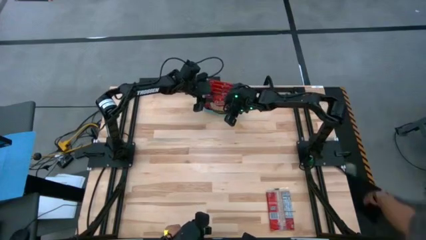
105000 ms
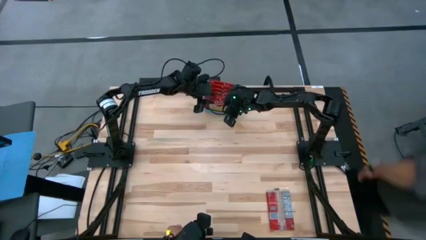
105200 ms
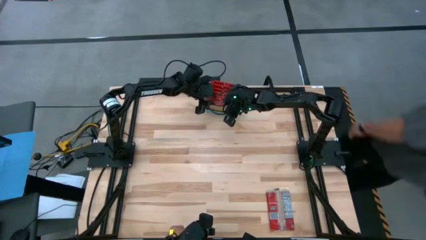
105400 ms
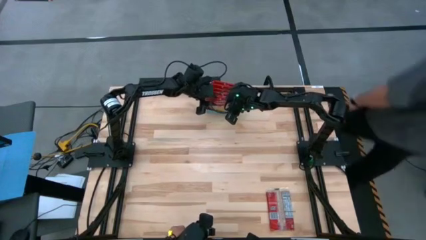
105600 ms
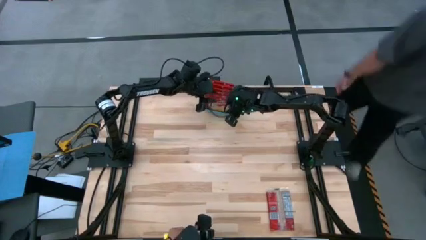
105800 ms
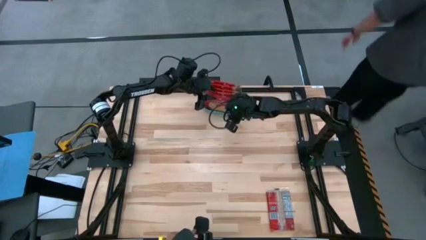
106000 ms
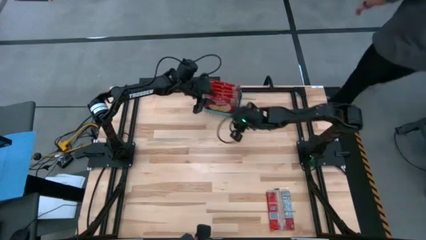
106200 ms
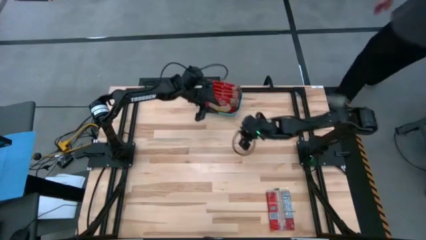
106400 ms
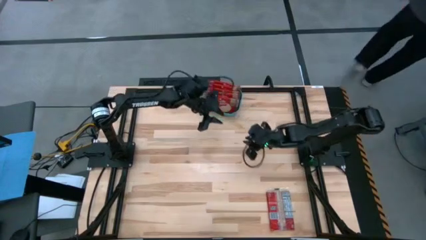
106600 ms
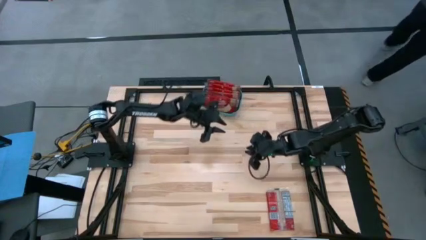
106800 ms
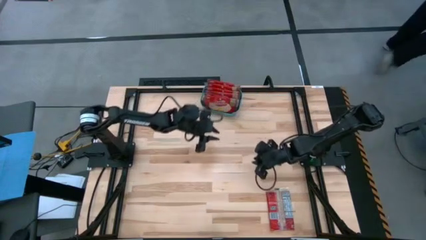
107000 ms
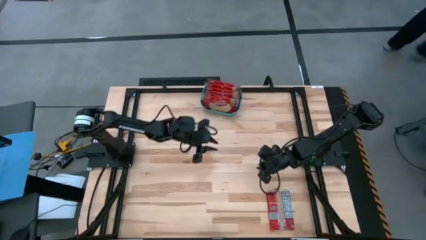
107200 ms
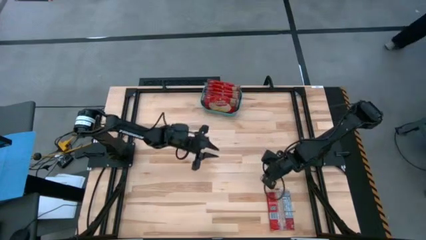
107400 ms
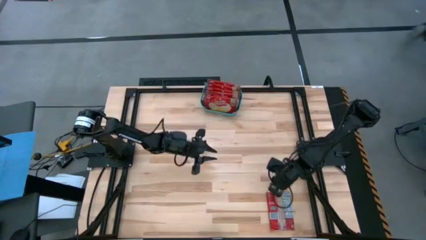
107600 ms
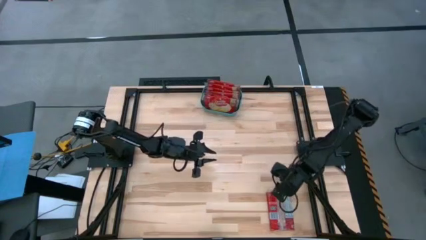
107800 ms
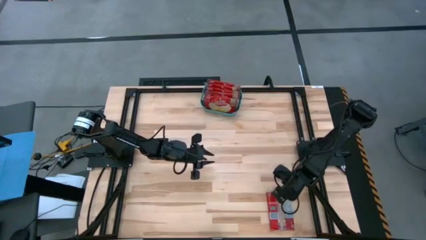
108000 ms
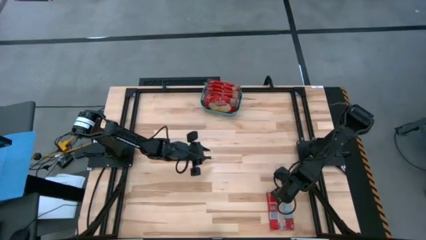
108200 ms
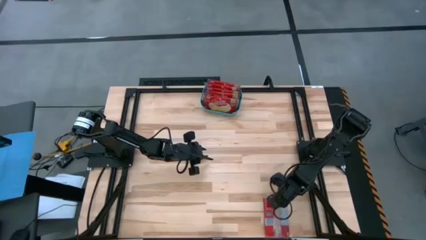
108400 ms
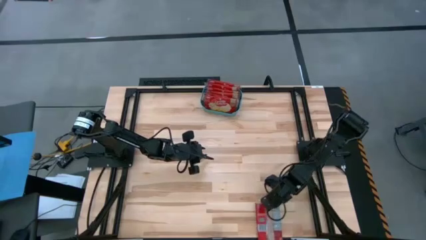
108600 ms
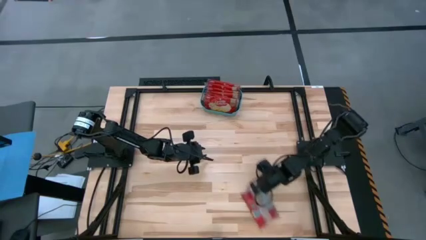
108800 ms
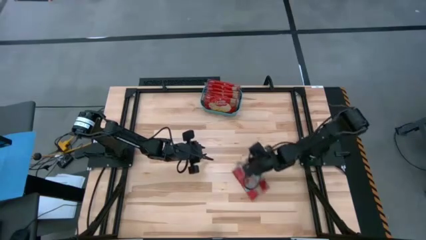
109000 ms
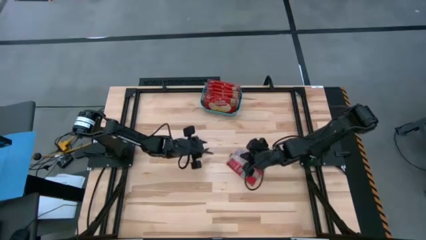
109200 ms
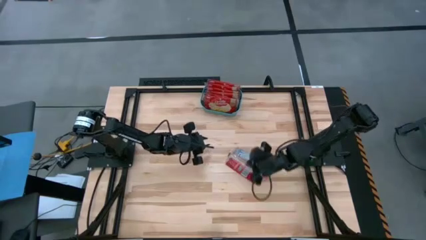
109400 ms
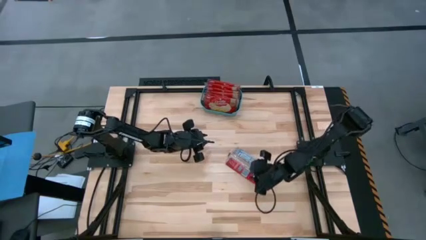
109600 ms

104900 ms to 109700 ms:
Task: Sort popcorn bags into baskets
Put the red popcorn bag into the blue bin

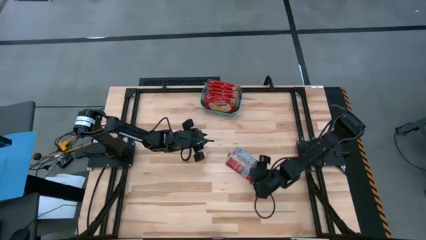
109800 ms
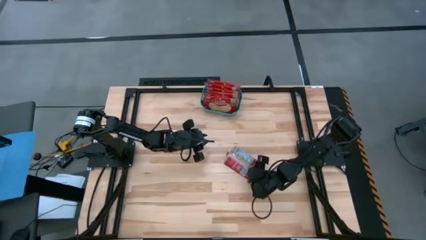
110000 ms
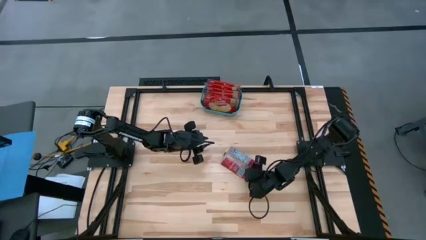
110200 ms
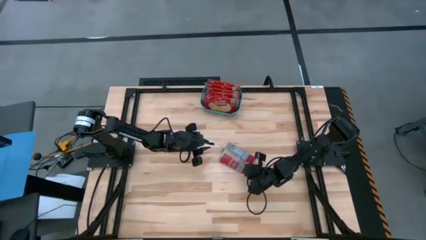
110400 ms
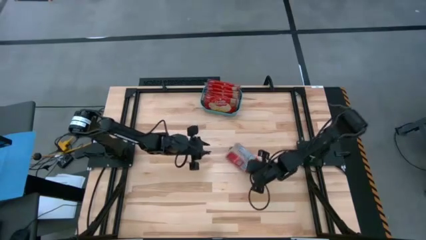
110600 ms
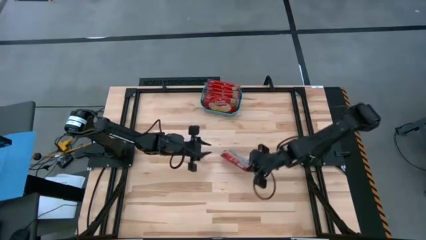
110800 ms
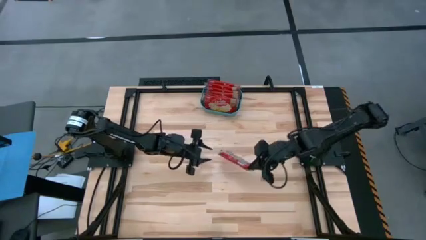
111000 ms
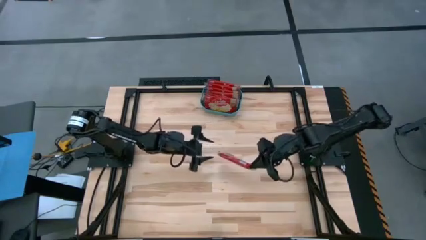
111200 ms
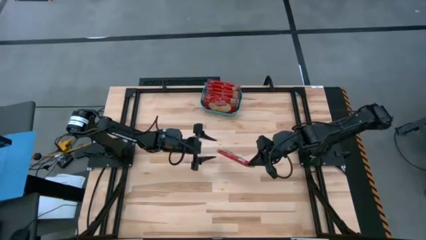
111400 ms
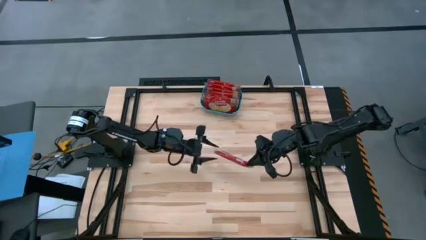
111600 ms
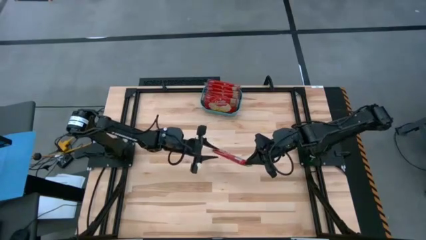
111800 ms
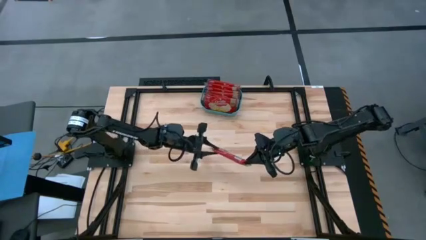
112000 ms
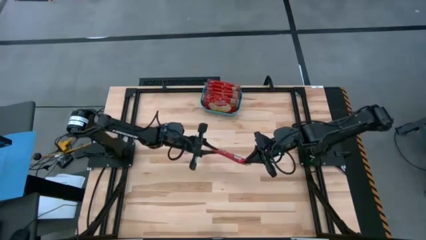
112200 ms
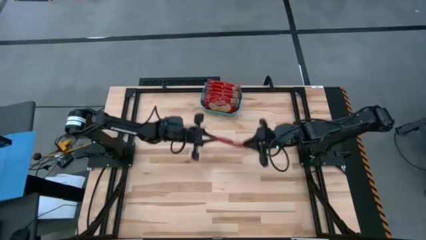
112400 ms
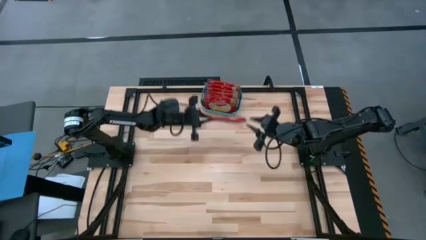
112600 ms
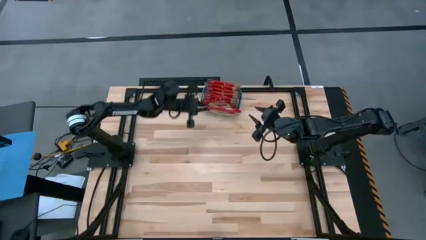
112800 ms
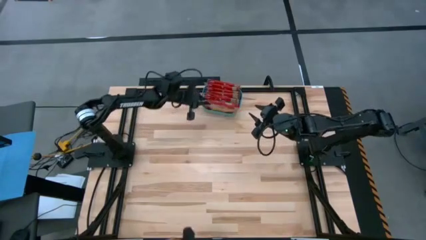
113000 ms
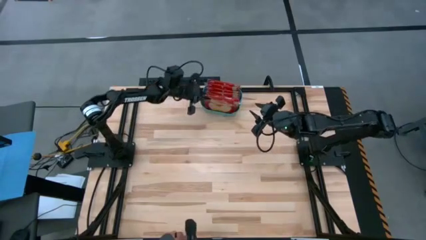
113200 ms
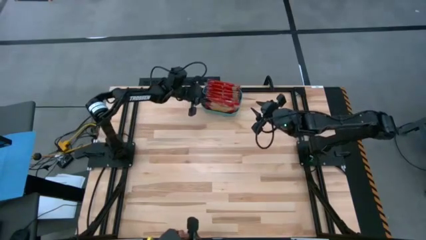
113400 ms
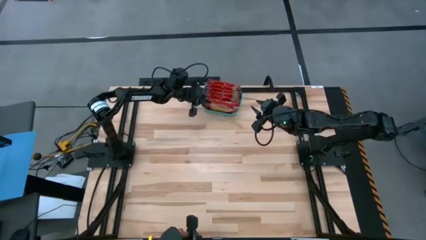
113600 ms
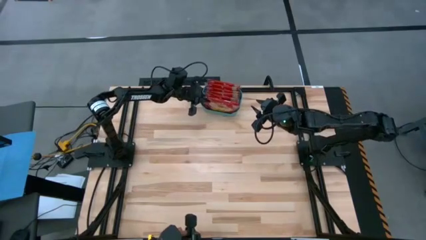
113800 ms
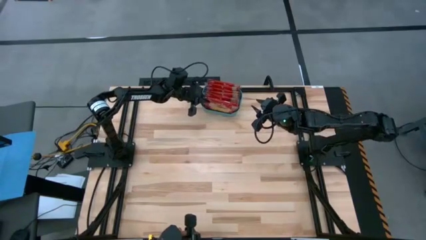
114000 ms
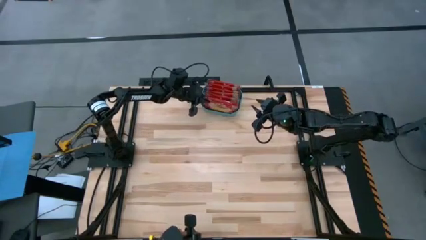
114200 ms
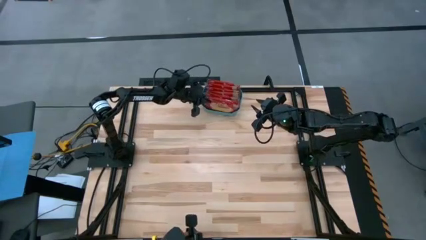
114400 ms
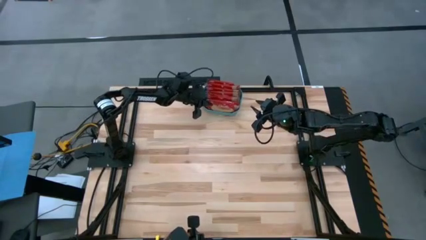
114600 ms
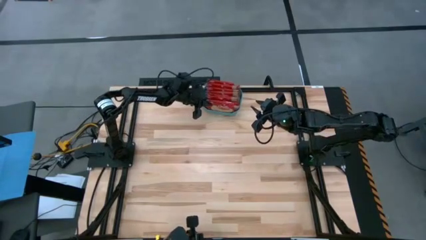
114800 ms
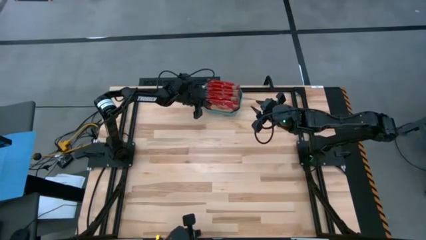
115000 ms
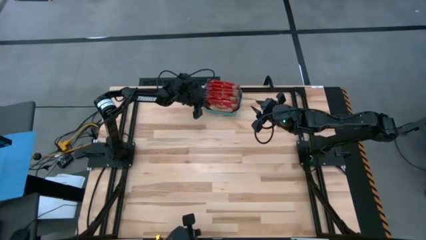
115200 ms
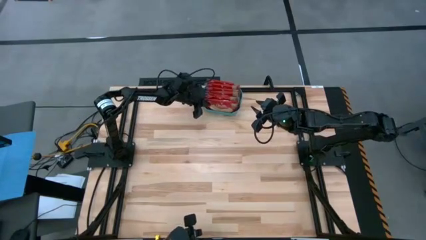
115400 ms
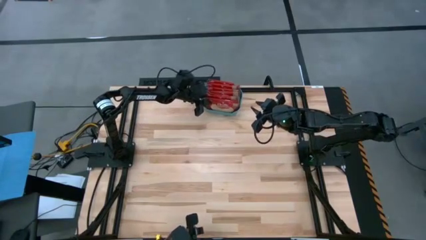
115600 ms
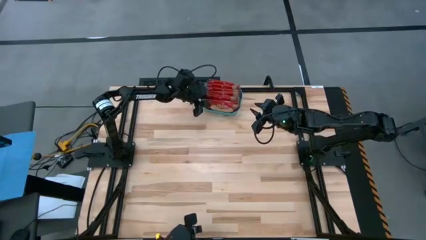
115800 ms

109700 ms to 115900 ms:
Put the red popcorn bag into the blue bin

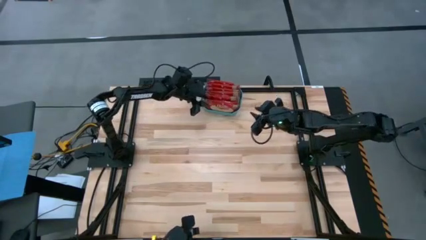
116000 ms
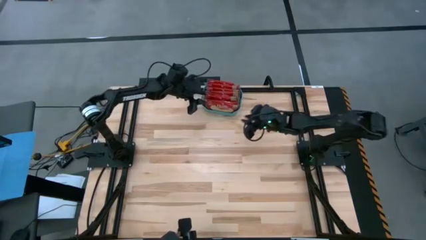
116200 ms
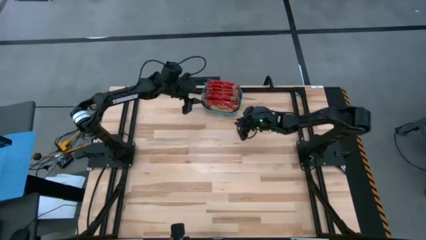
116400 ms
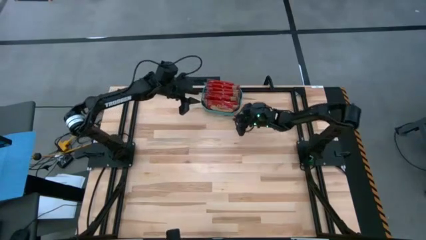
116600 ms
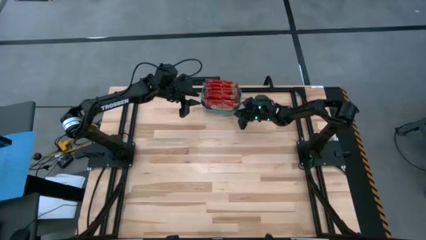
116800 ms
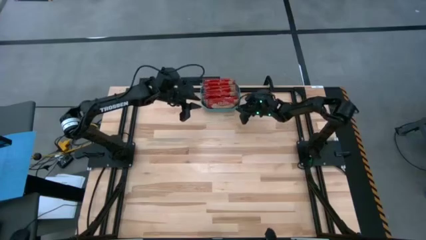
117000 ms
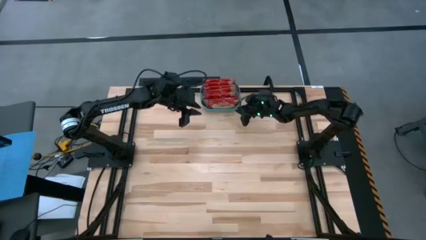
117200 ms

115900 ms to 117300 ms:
Adjust the blue bin

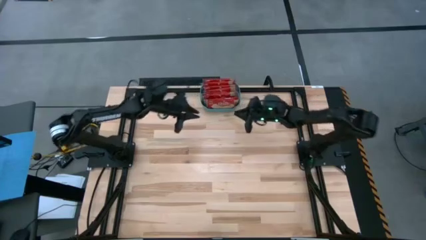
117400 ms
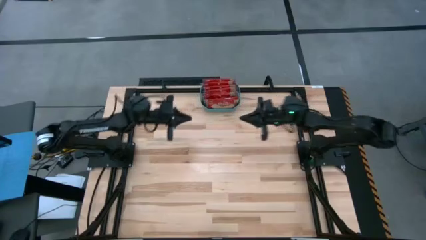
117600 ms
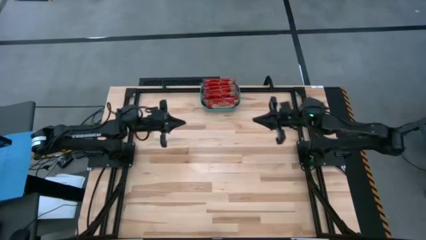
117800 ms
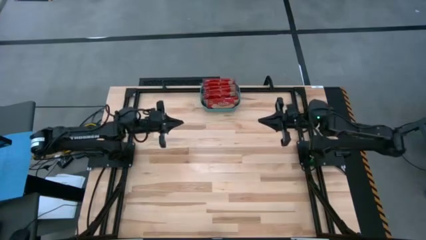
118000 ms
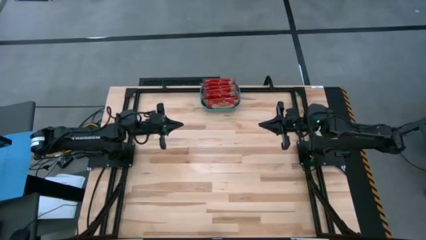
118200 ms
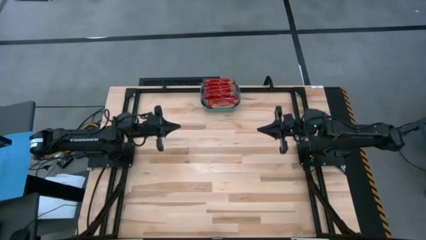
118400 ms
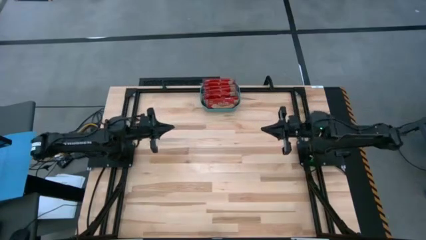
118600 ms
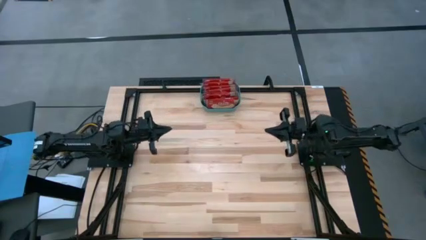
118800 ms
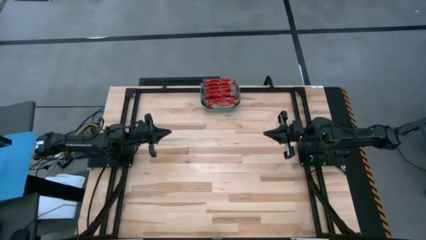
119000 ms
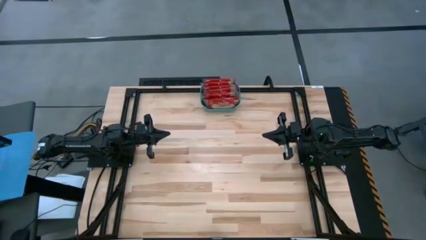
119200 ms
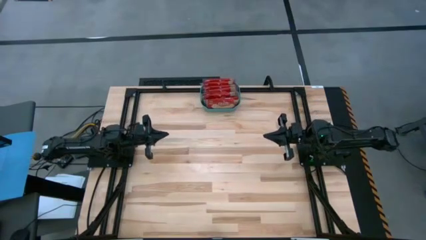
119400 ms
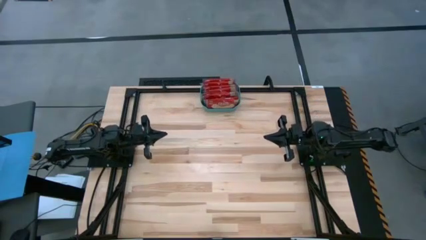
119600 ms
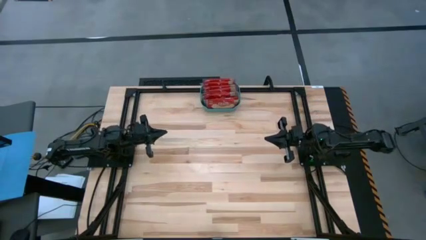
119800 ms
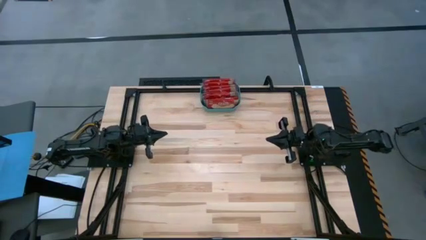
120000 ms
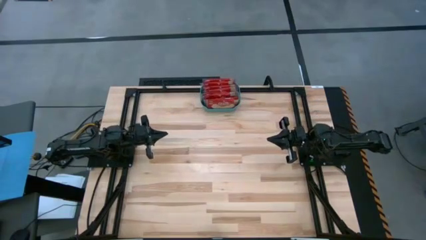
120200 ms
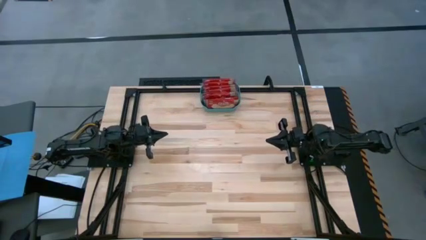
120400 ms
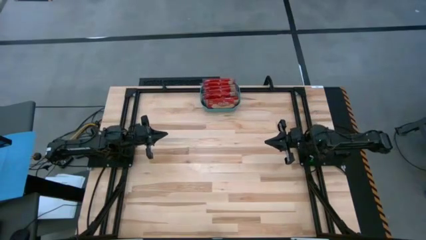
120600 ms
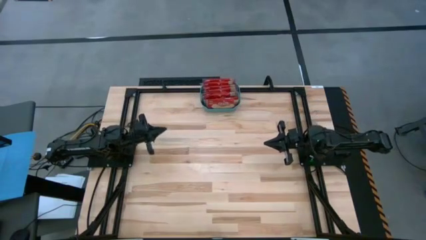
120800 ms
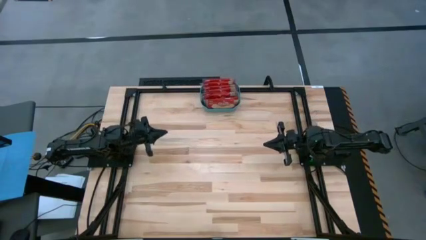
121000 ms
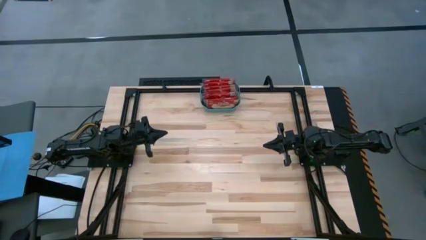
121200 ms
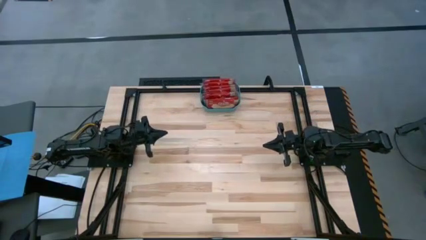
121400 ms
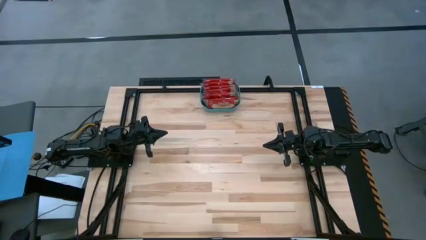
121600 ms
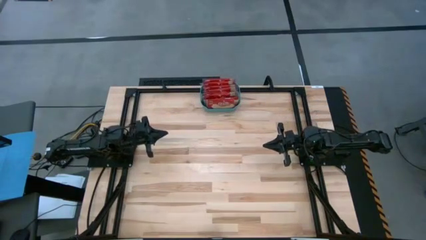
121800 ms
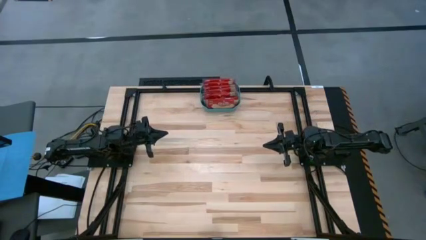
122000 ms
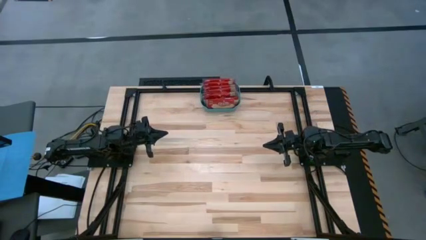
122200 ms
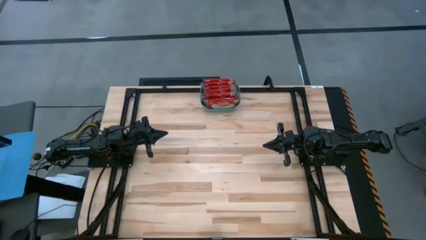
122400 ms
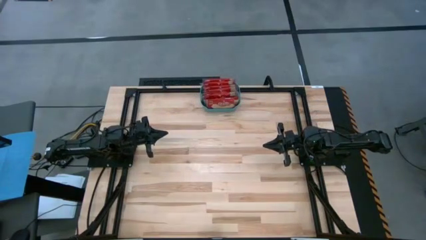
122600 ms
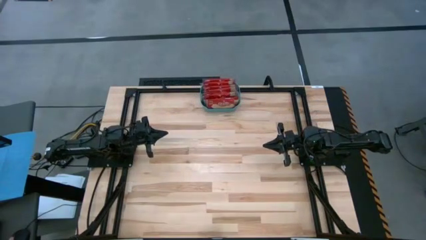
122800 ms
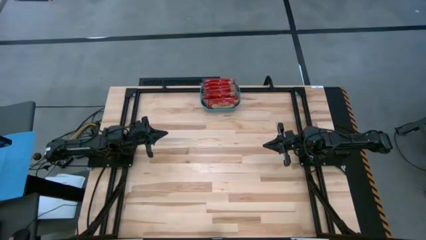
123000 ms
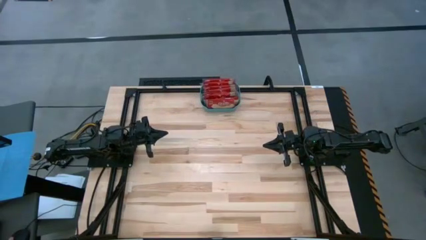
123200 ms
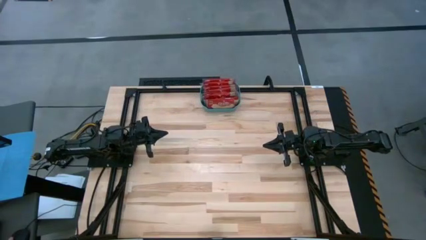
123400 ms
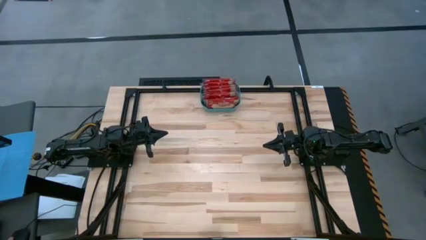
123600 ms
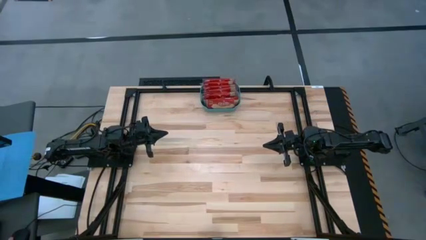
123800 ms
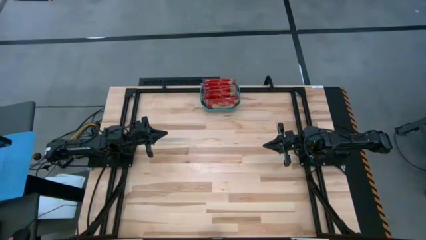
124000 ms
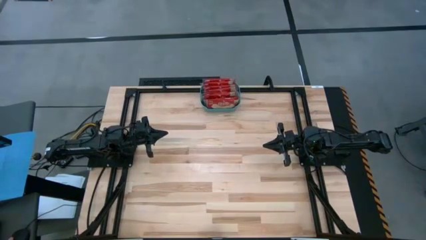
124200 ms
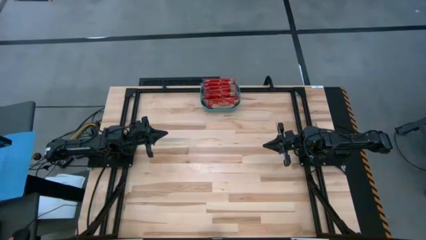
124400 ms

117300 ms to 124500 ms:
Return to Home Position
